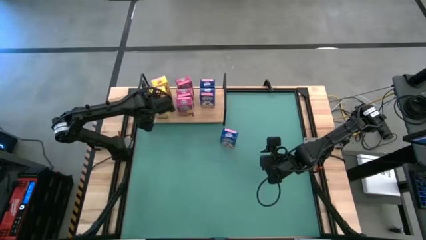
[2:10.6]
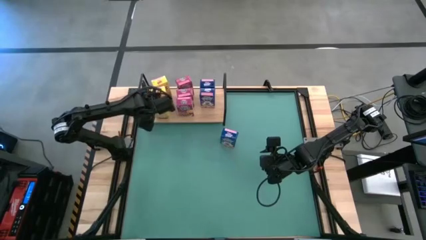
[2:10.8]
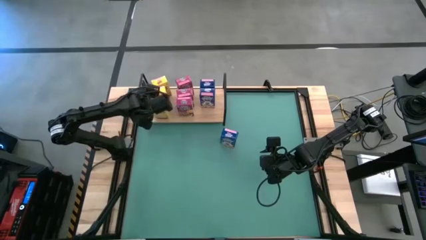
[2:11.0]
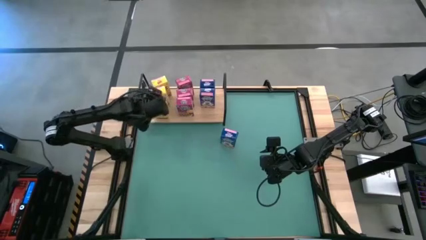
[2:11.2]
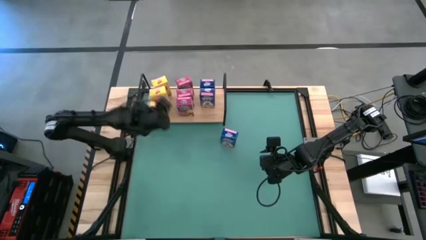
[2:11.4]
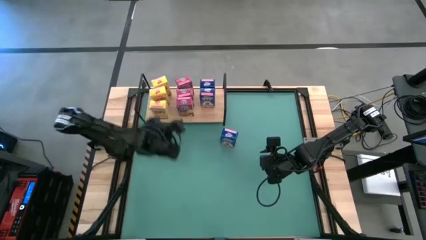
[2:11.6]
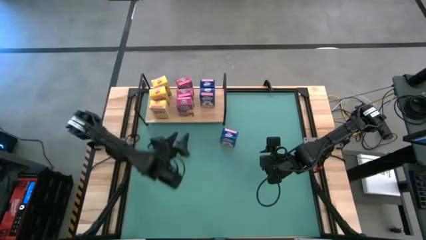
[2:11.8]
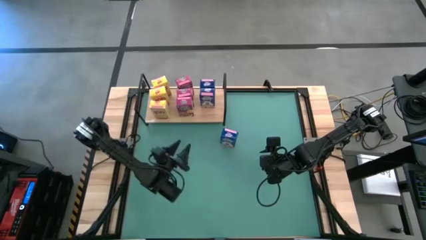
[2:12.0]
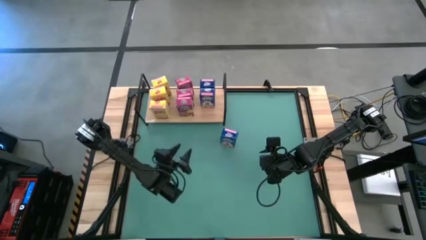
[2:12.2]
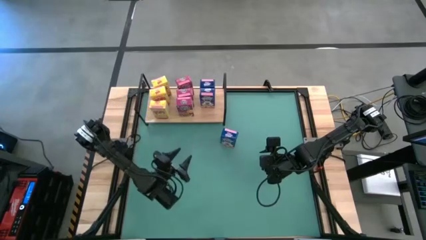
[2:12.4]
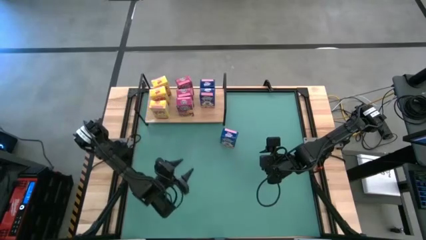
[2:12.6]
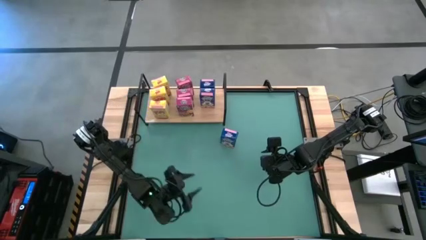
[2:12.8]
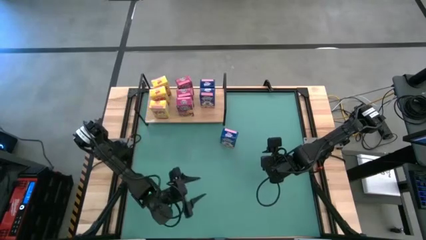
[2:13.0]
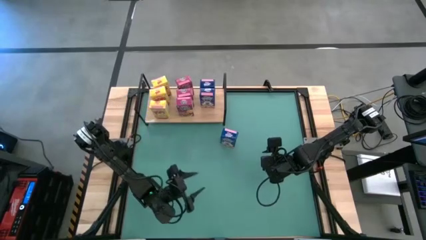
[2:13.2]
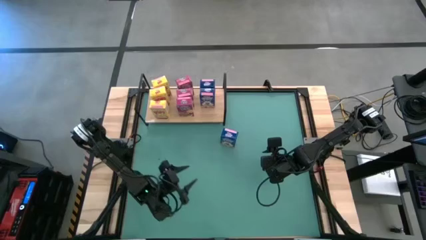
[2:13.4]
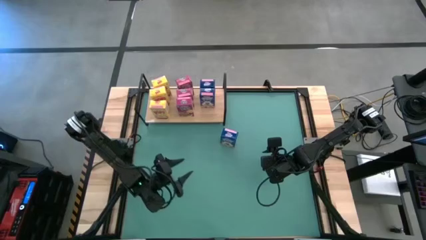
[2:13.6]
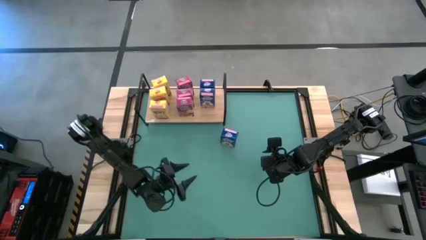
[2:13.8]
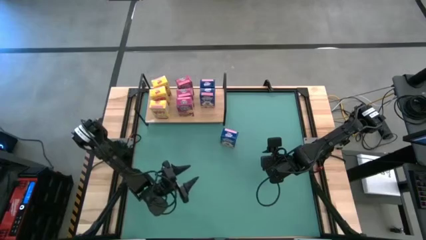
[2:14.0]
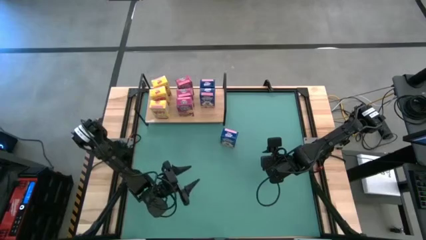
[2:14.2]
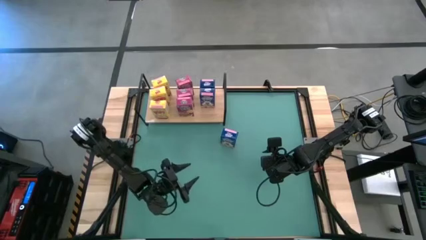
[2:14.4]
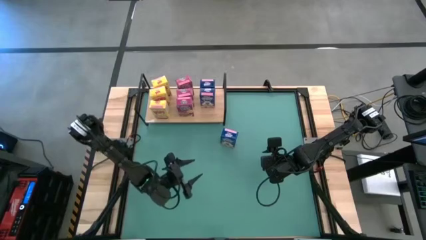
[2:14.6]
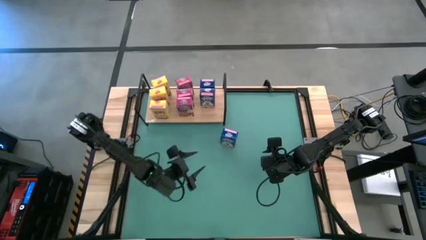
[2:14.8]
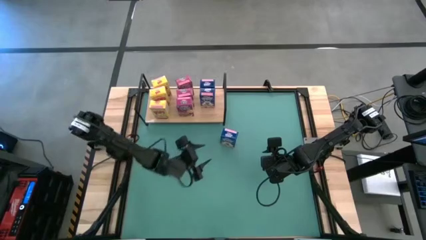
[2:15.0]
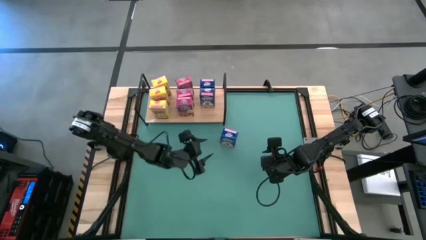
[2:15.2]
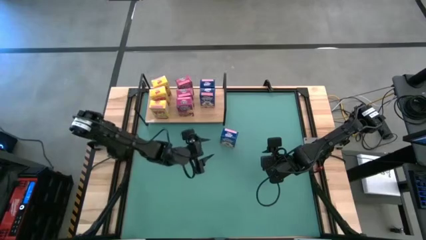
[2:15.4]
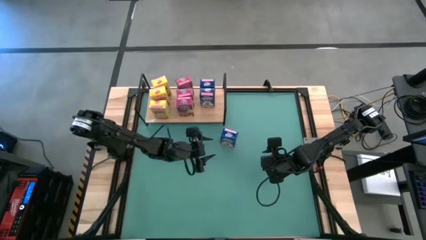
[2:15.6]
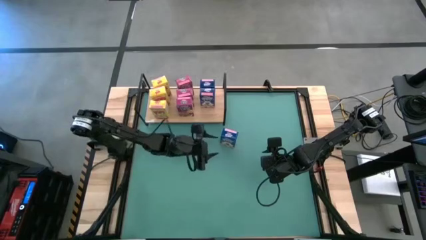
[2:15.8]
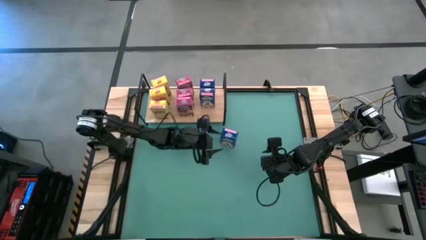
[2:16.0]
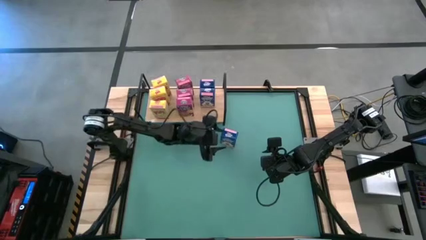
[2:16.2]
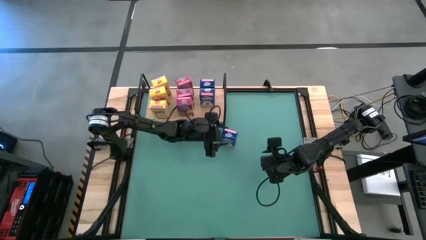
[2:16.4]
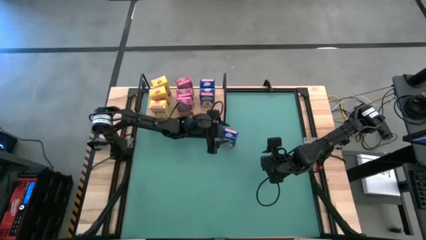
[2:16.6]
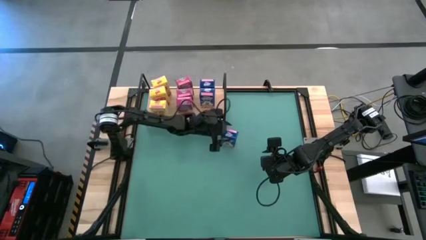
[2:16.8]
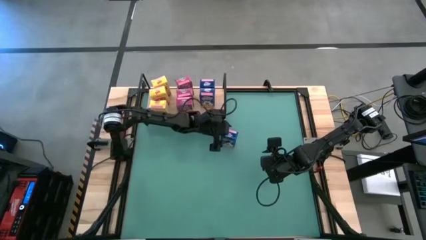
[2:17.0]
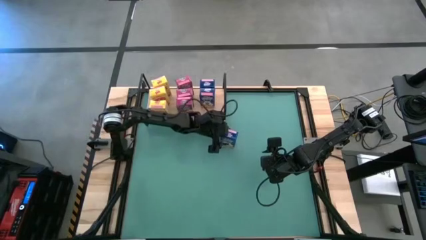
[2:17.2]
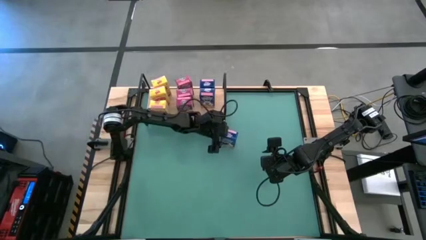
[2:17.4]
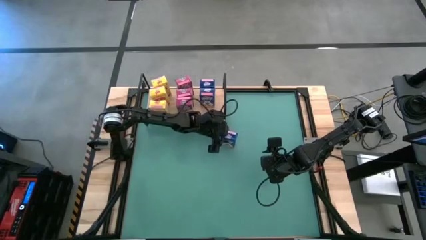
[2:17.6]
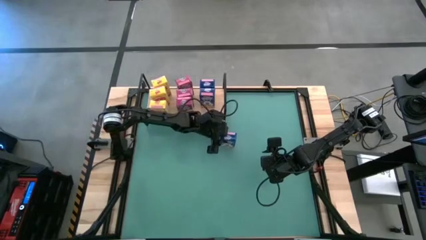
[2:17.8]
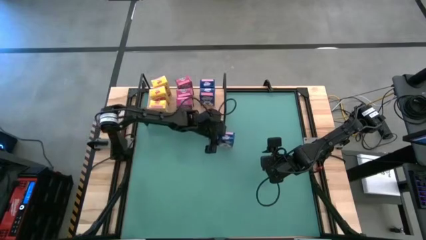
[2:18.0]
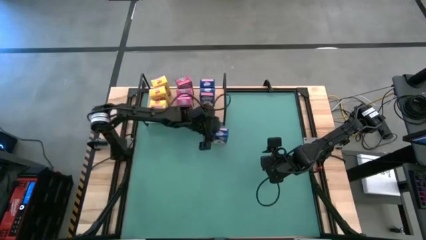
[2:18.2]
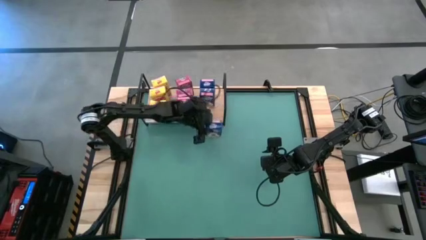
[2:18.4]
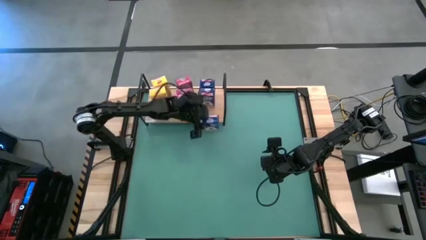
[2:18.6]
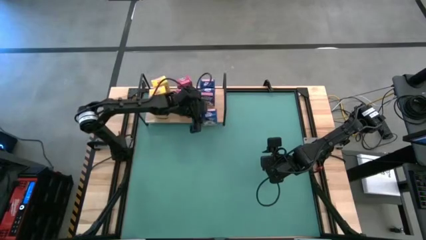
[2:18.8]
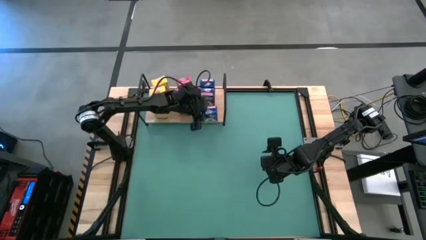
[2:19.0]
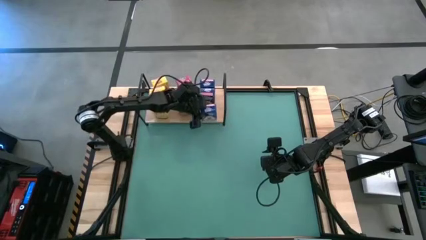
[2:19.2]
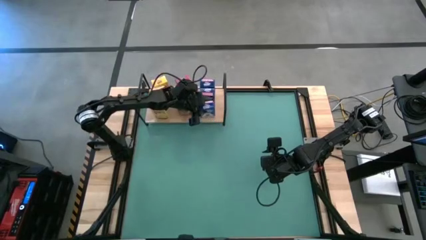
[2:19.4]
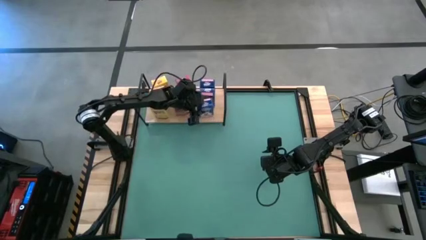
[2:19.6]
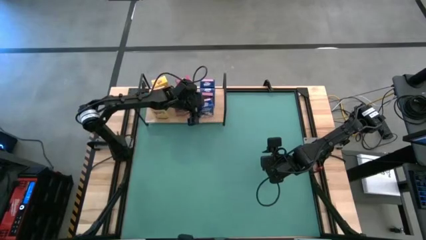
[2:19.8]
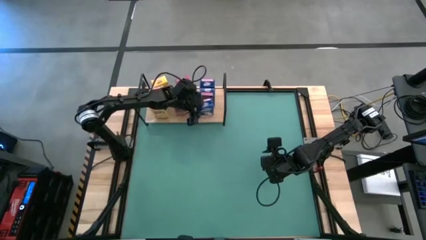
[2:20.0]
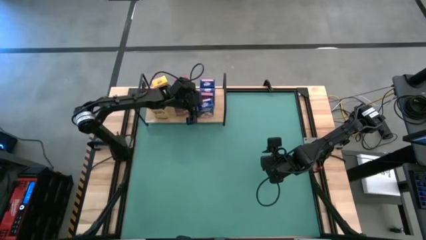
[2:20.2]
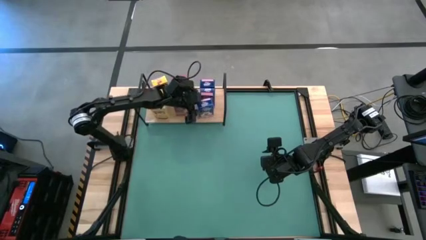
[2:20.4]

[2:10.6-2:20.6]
Task: Stack cereal on shelf
Put the blue cereal box on the shelf aligned with the other blue cereal boxes

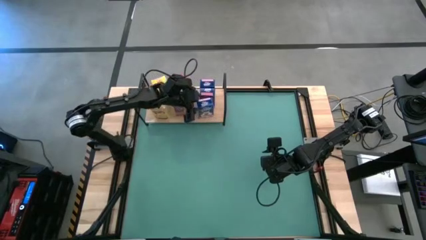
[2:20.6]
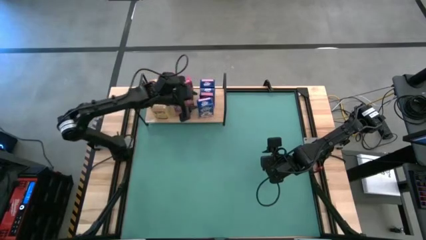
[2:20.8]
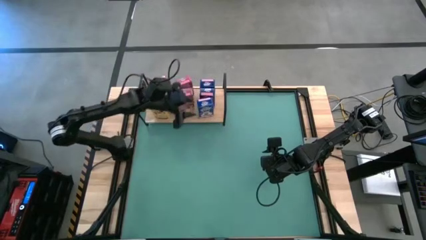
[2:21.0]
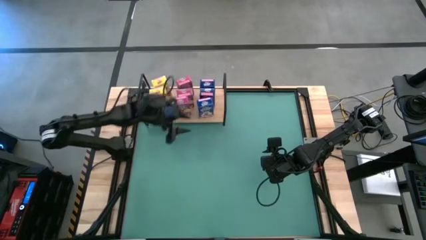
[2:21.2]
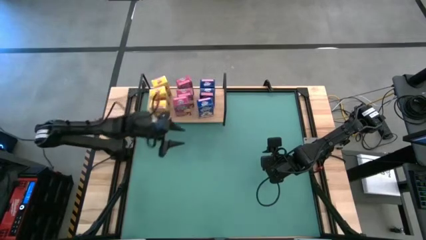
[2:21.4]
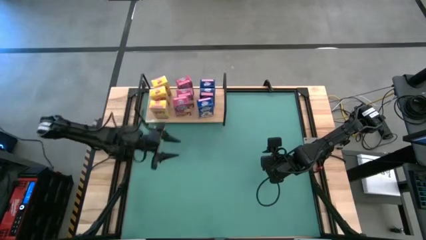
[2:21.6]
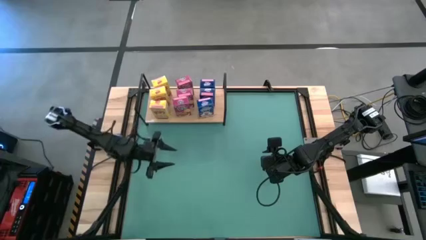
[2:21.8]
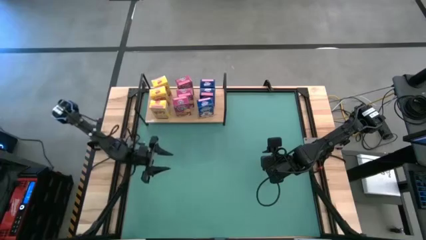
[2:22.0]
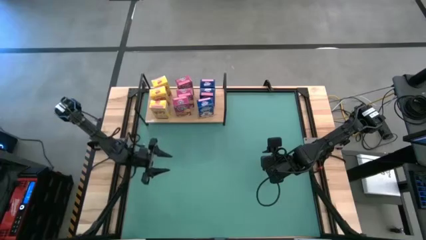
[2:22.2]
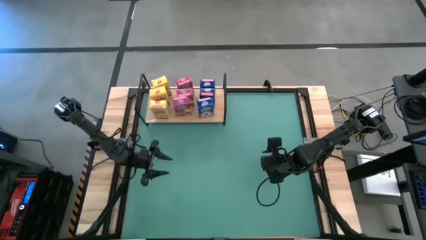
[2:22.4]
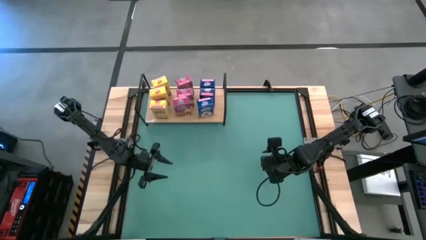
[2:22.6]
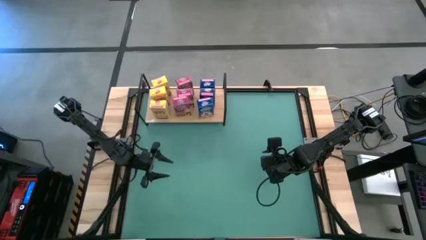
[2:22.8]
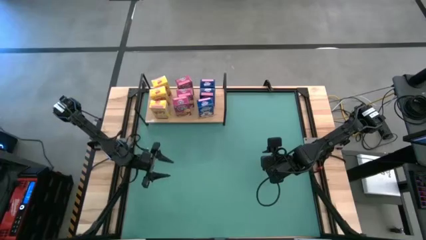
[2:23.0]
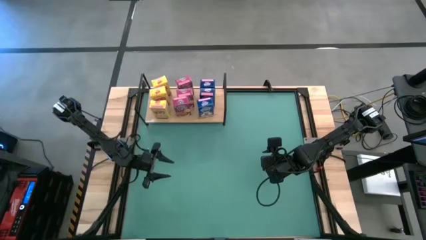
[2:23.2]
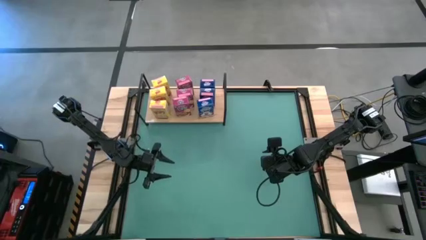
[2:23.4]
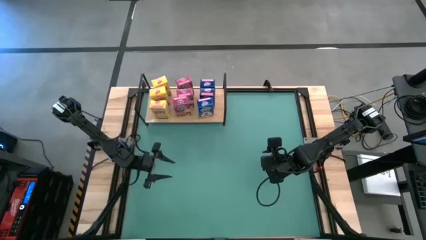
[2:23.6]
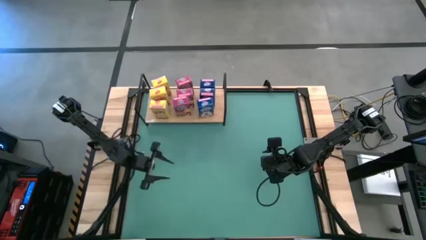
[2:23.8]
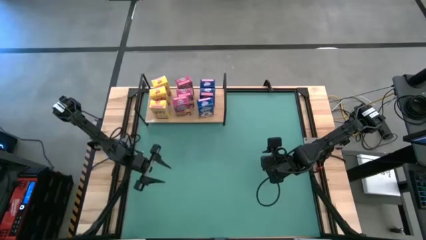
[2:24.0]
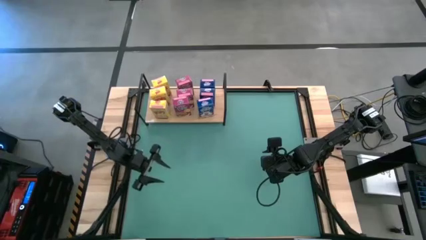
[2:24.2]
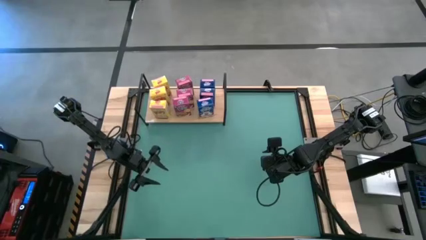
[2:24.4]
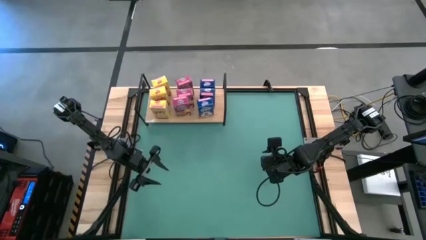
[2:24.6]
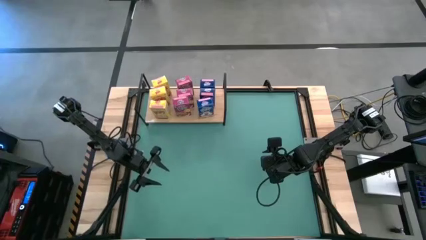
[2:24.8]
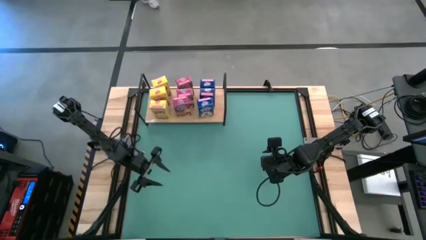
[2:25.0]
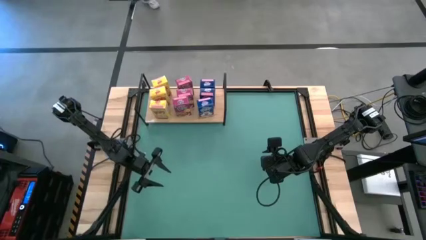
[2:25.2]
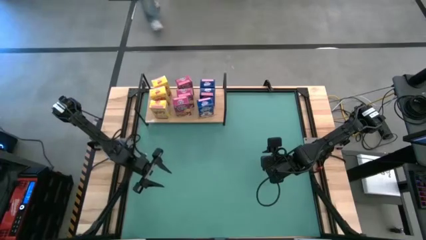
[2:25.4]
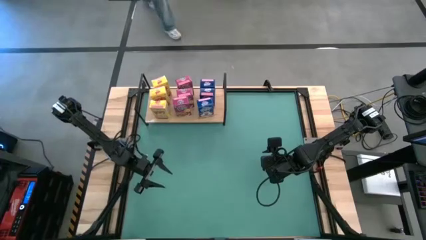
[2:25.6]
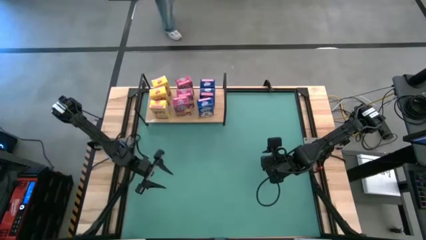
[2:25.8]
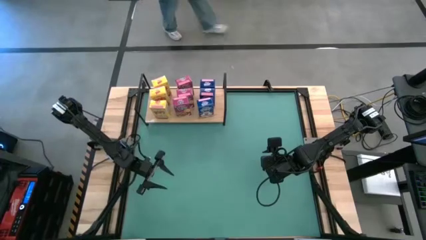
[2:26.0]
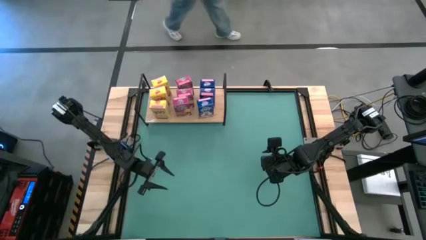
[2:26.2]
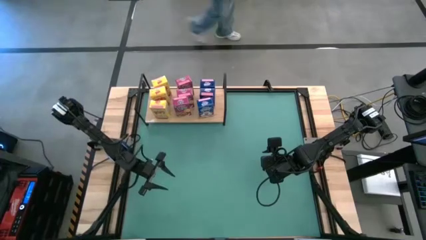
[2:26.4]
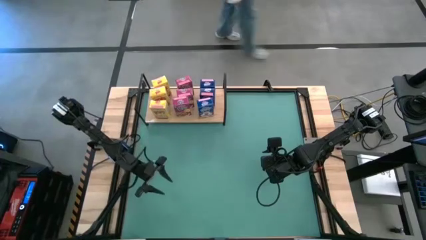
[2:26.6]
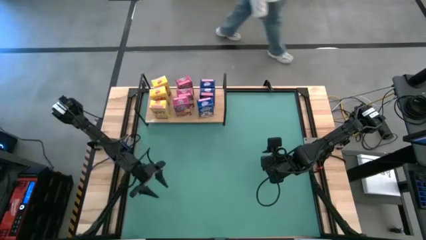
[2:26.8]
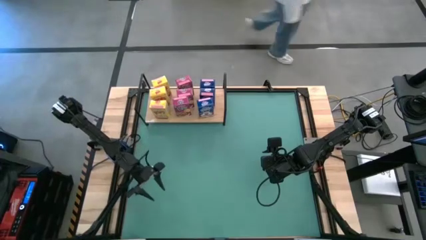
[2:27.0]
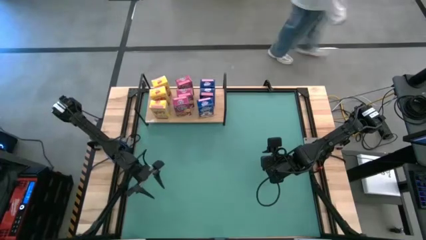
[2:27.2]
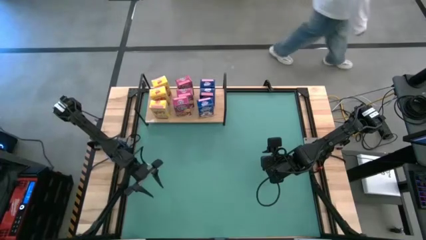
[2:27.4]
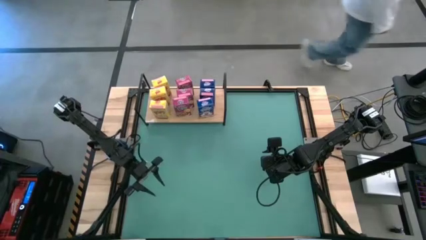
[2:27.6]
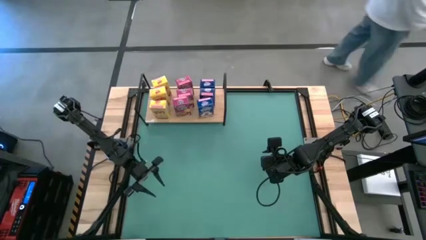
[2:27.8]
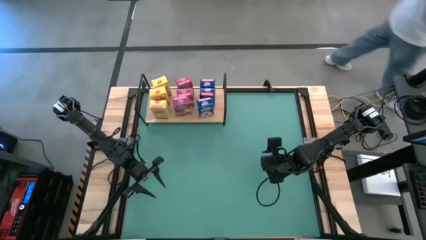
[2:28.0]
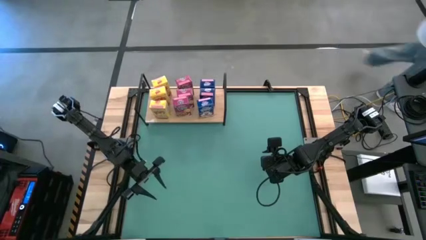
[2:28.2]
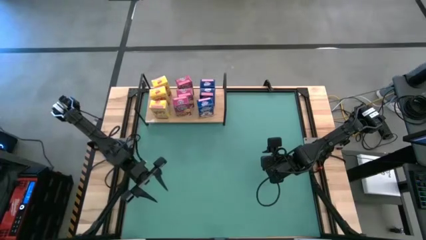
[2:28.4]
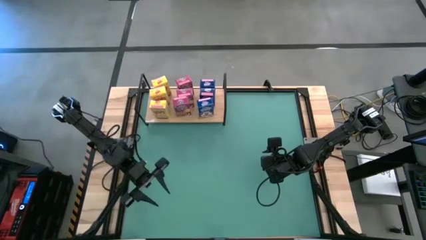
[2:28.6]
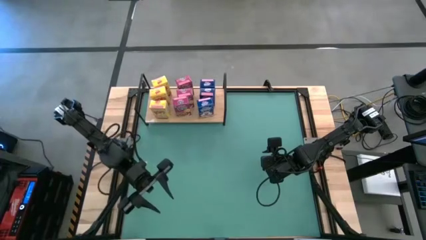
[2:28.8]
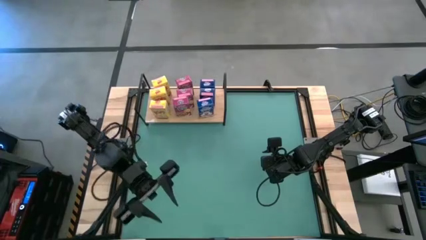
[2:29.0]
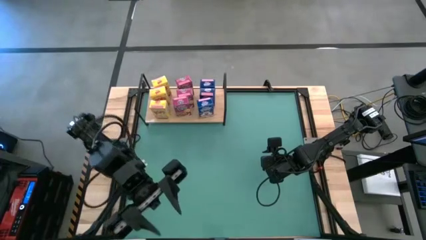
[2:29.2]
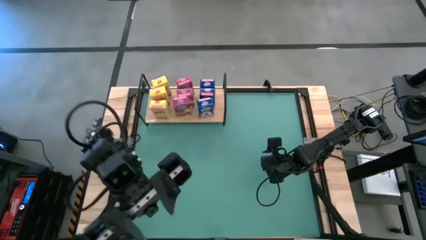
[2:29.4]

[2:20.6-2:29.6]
Return to Home Position
